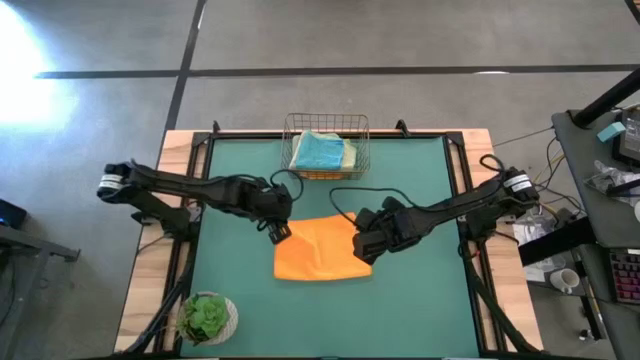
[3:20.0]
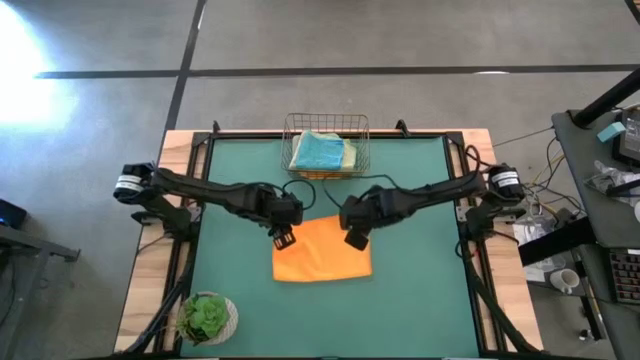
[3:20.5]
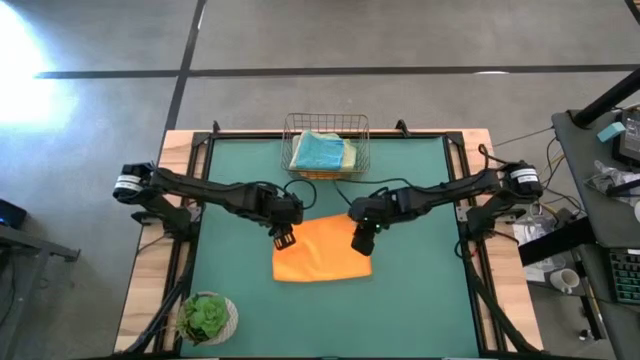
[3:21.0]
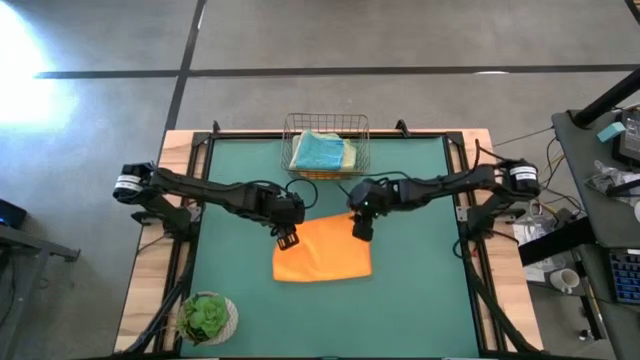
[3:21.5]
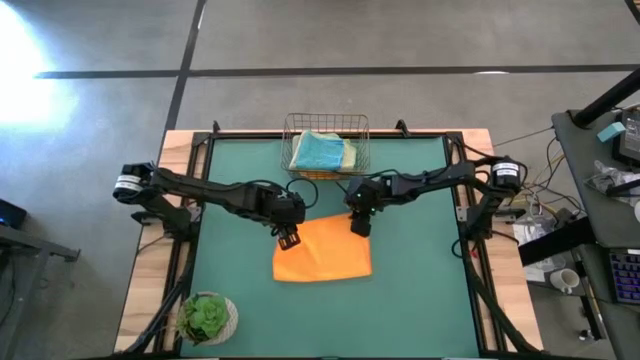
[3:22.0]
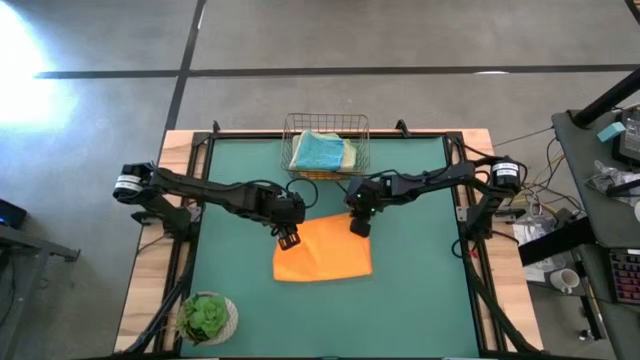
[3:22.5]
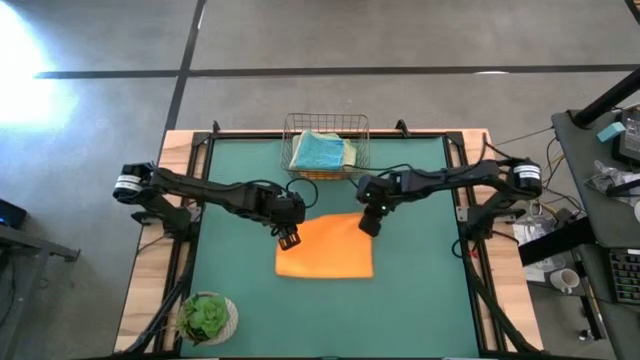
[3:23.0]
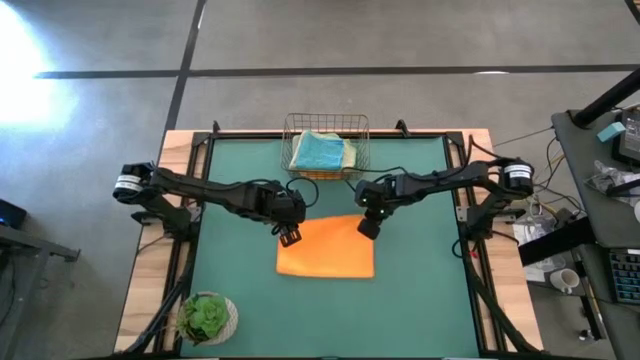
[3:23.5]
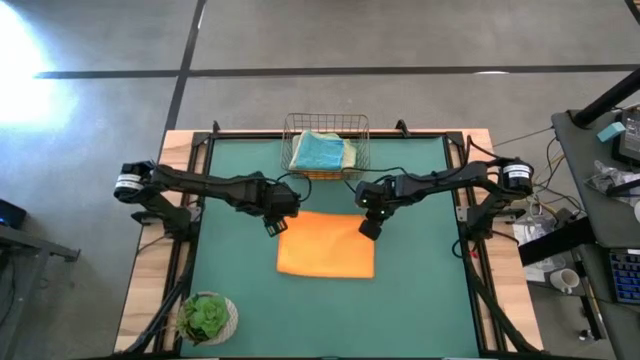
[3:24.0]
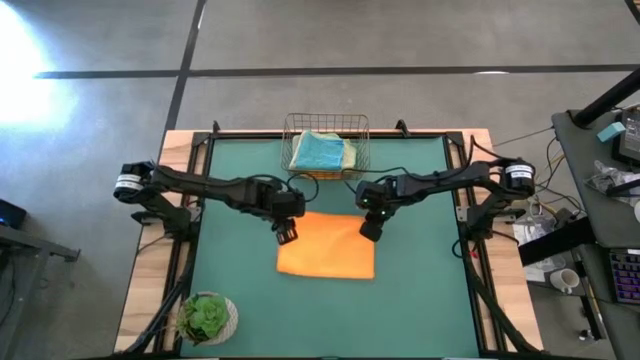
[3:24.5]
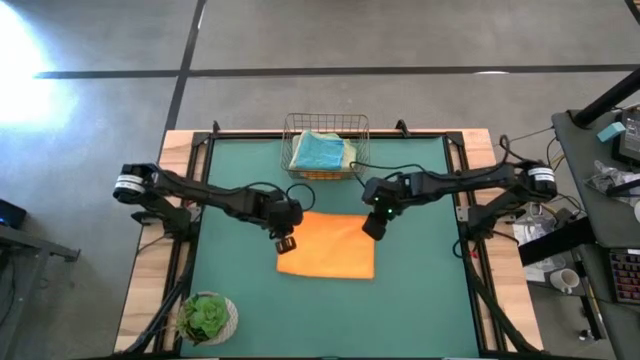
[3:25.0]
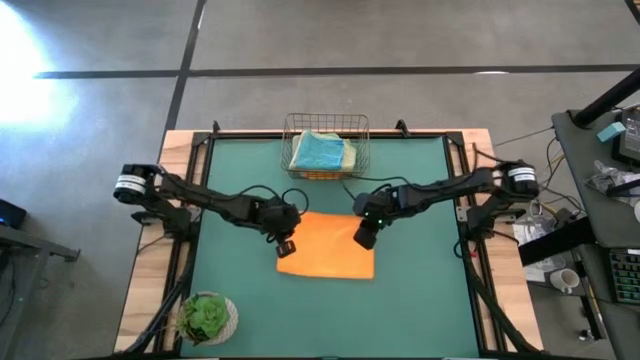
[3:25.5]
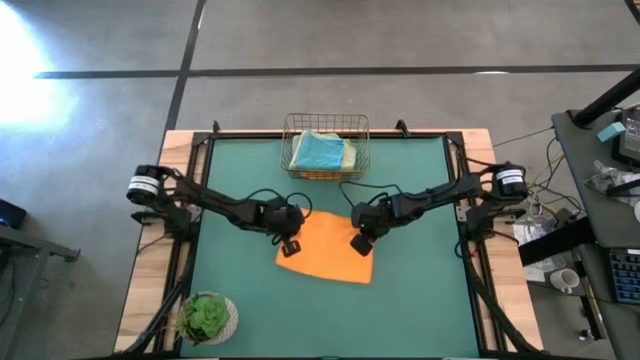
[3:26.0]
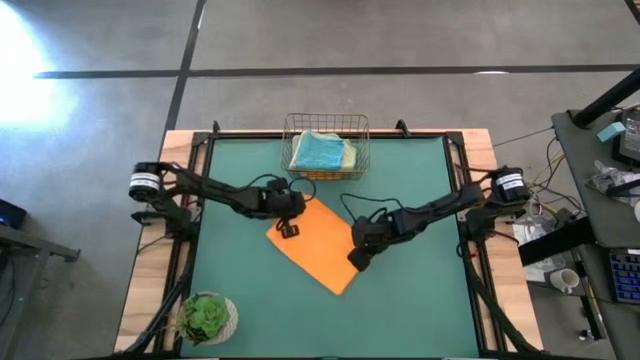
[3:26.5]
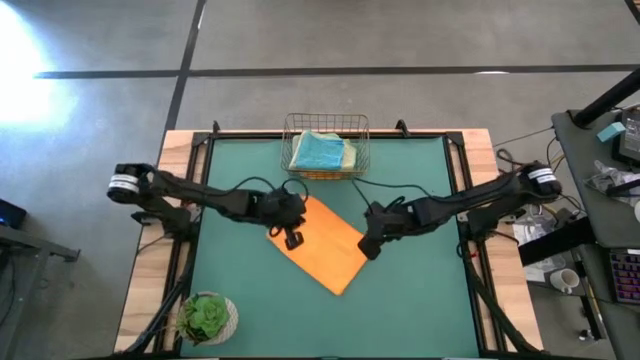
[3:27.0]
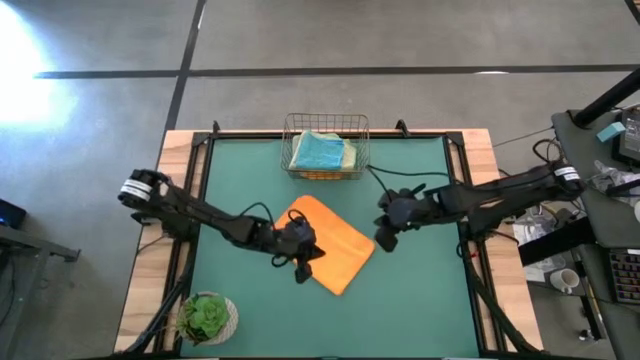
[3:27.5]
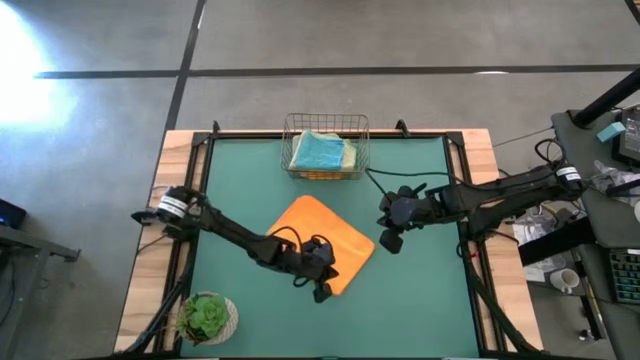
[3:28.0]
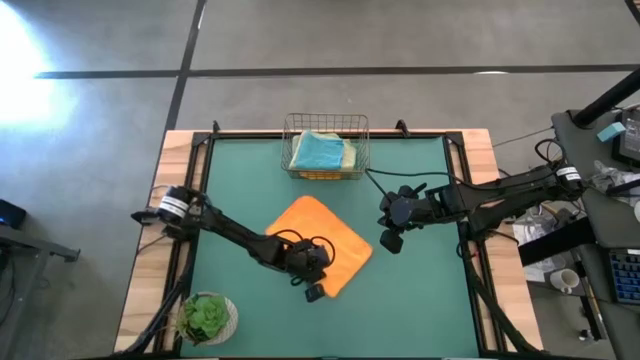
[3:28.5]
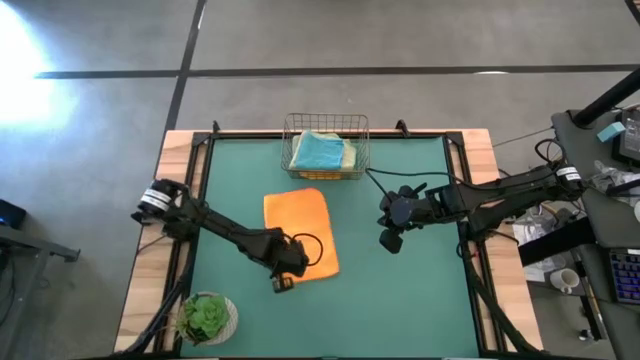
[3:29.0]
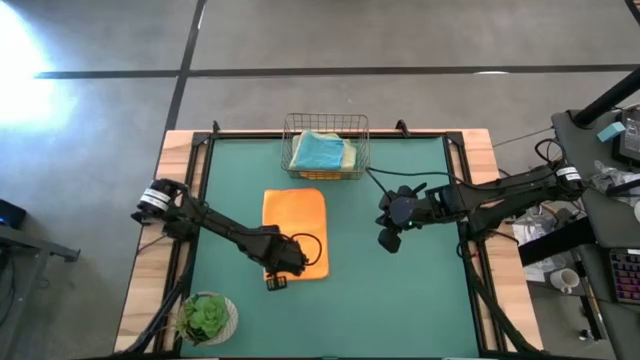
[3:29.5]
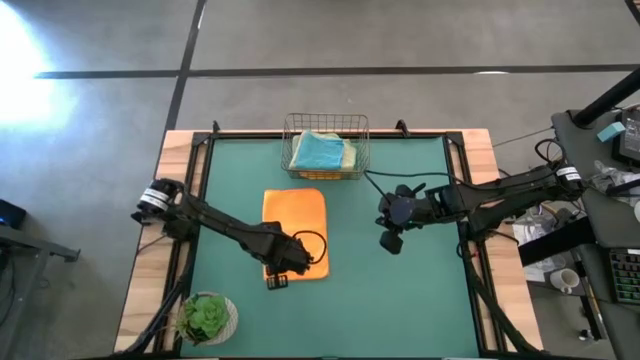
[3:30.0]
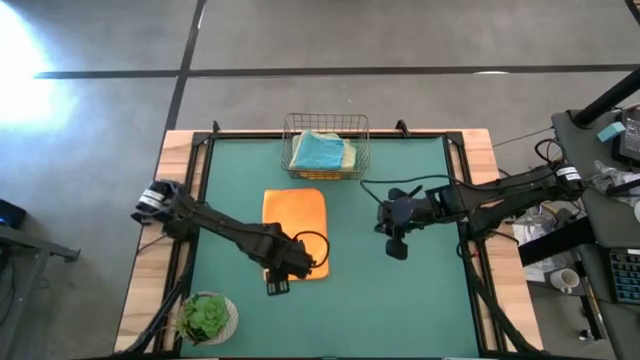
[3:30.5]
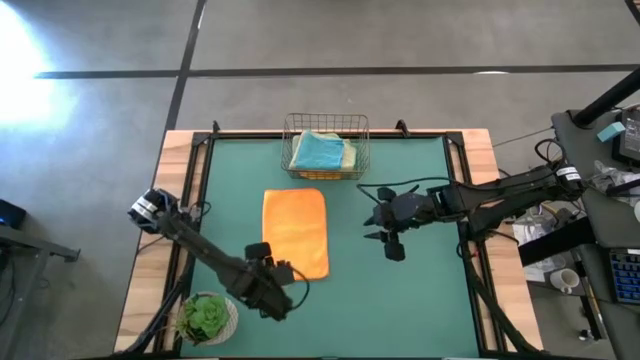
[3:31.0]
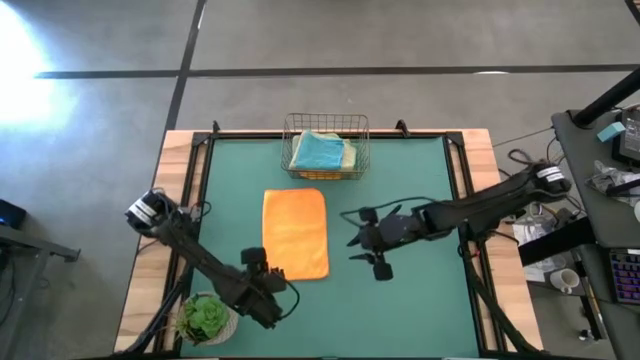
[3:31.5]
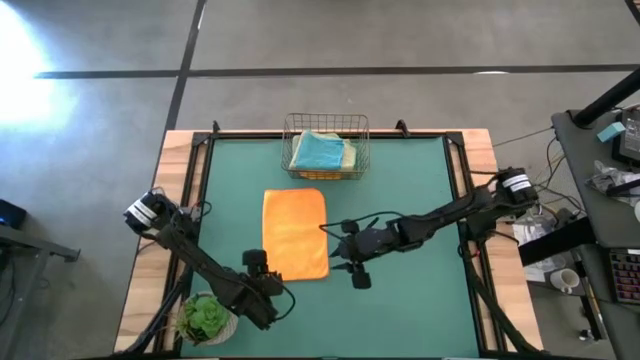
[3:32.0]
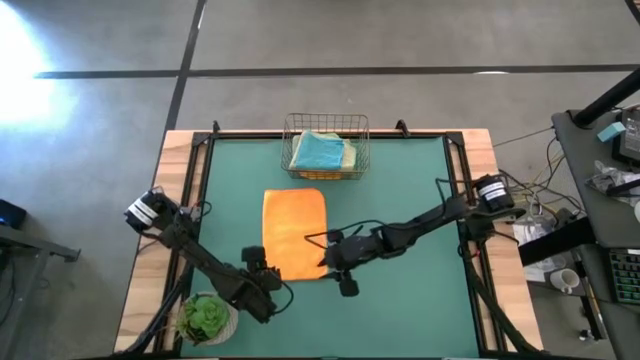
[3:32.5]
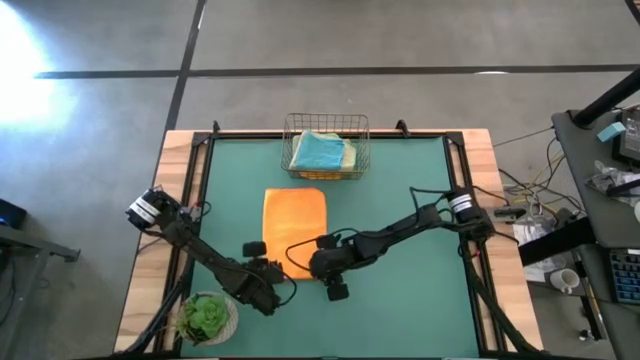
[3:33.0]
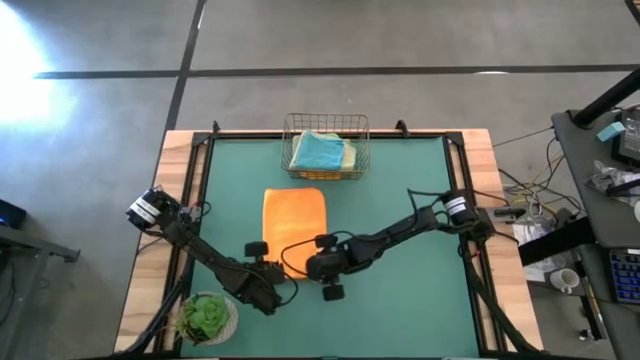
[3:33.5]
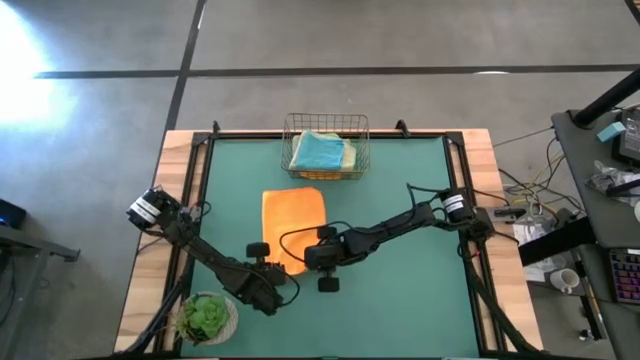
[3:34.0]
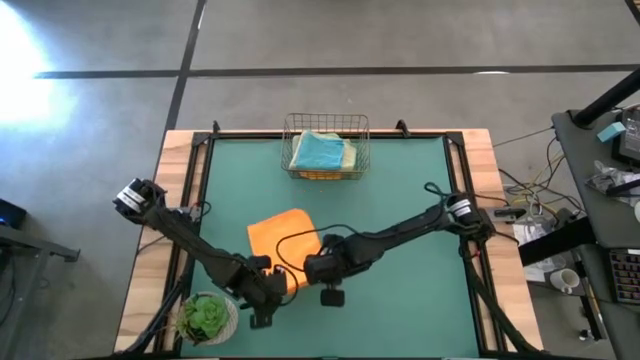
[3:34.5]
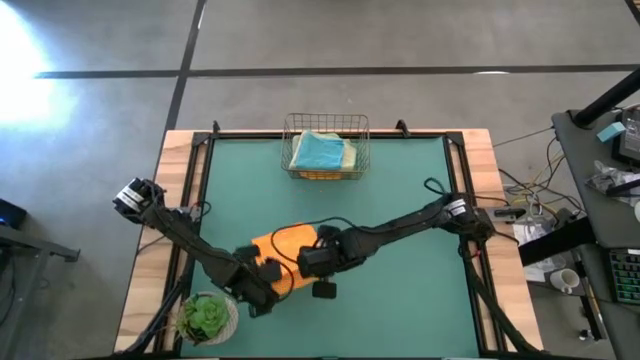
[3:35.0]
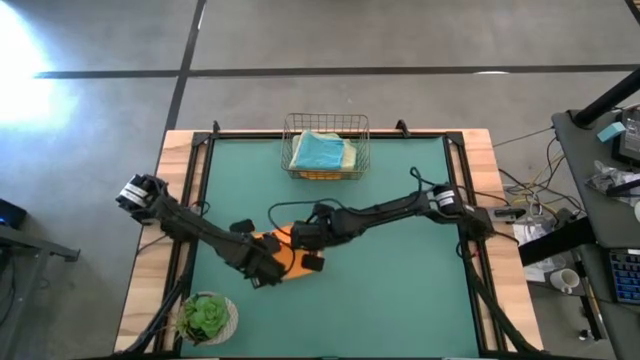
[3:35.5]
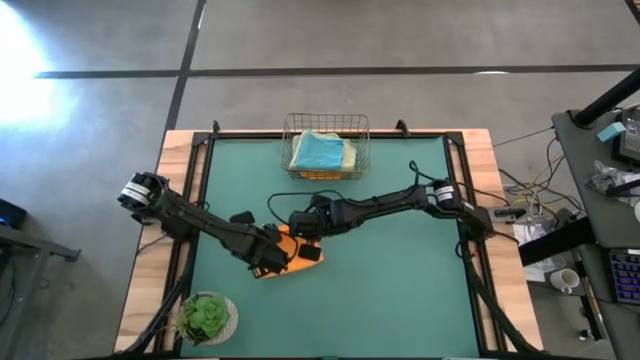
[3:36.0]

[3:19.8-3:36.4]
Task: Fold microfiber towels
Fold the orange microfiber towel

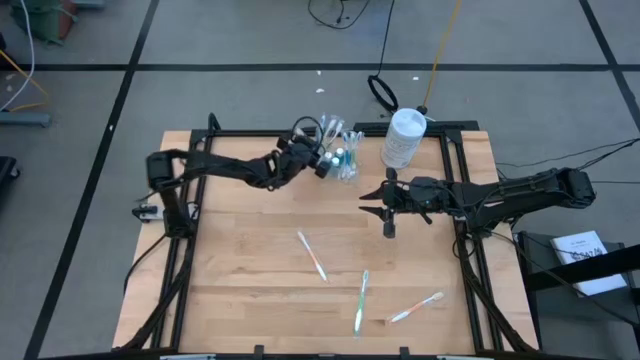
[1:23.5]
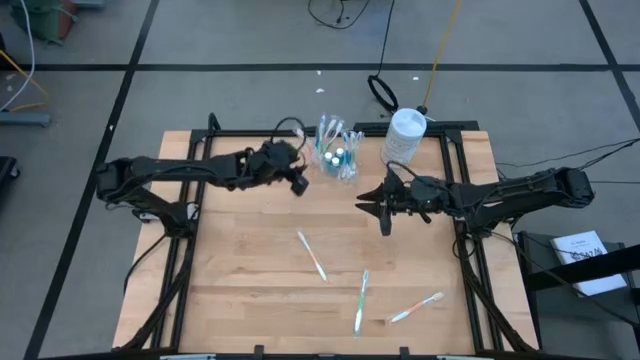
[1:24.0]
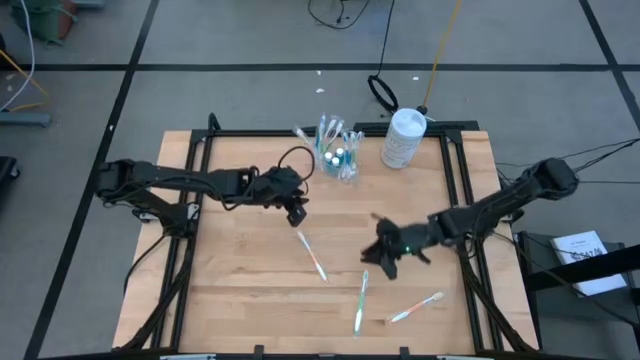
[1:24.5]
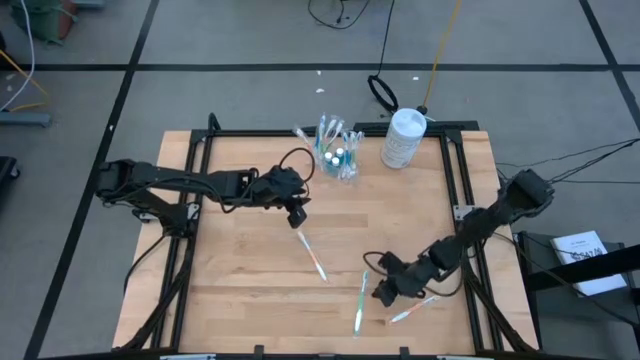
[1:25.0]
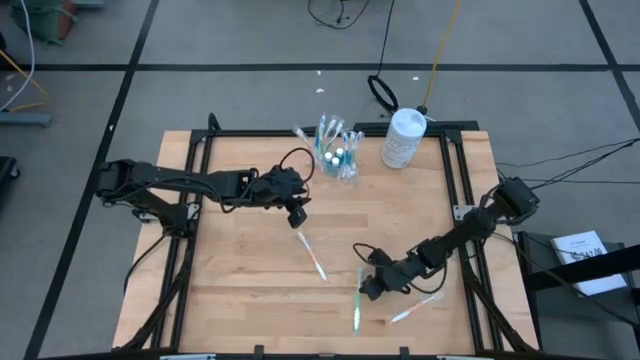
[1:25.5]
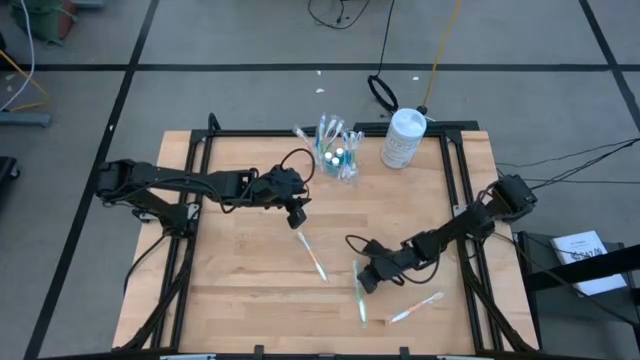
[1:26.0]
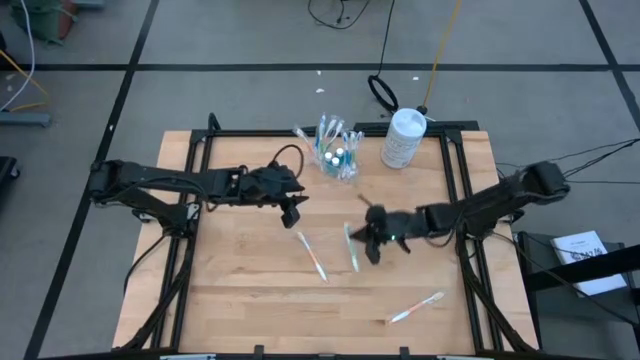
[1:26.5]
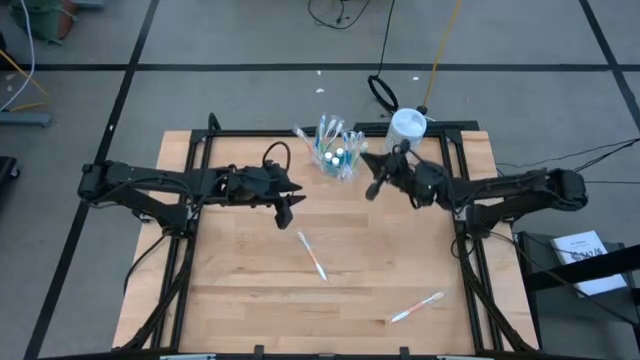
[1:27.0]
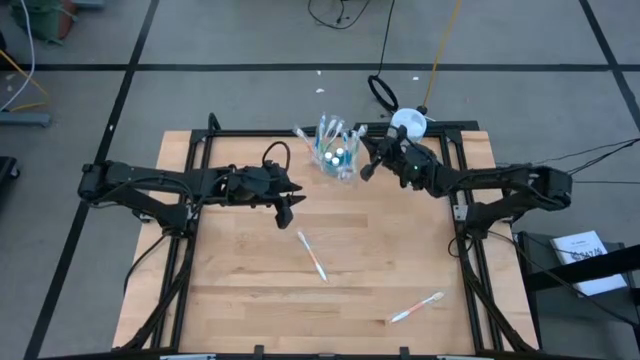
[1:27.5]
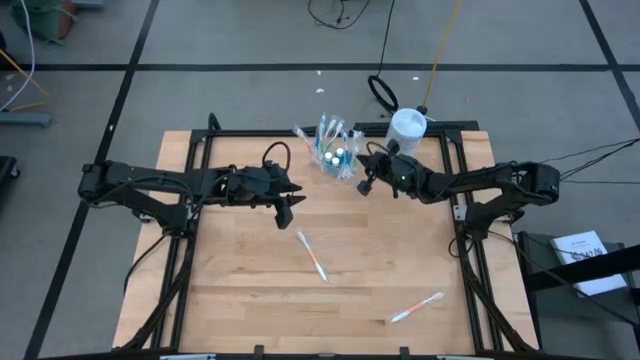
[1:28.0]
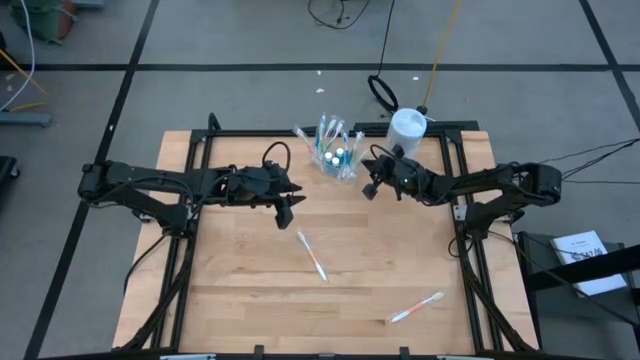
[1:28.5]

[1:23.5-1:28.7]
Task: Pick & Place toothbrushing station
Put the green toothbrush into the transparent organizer
